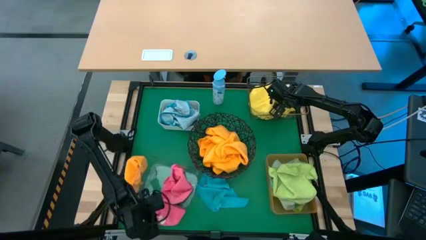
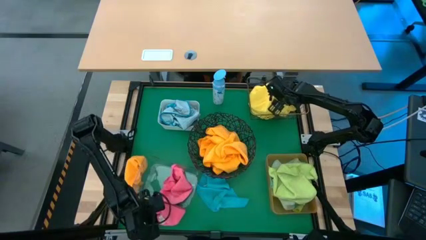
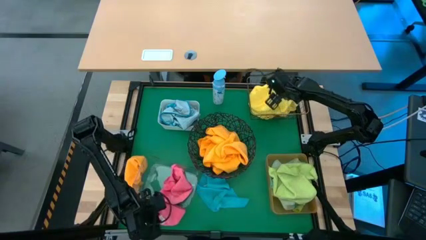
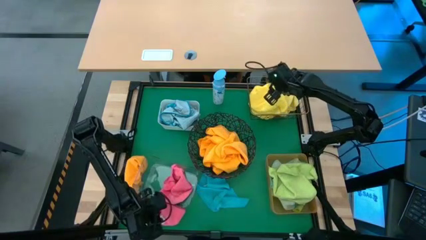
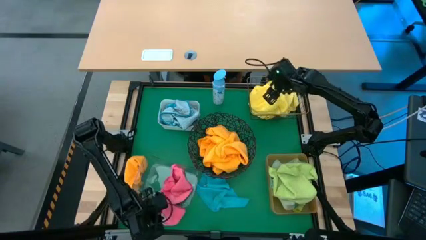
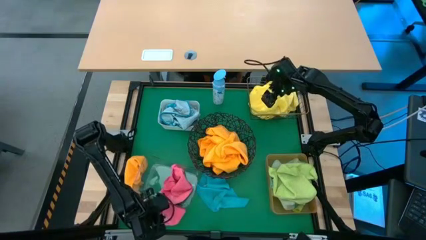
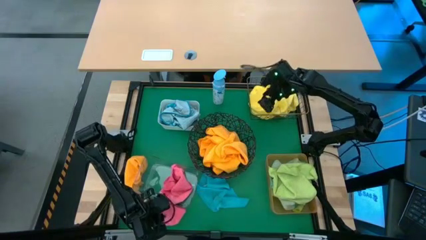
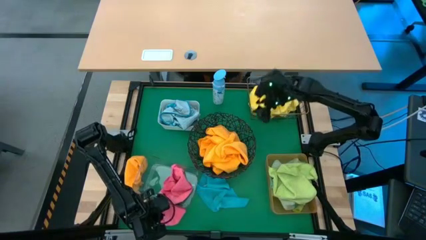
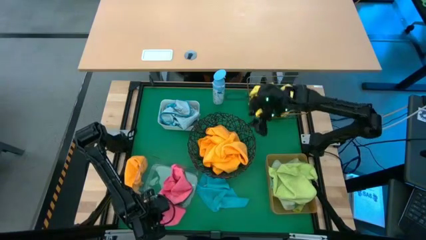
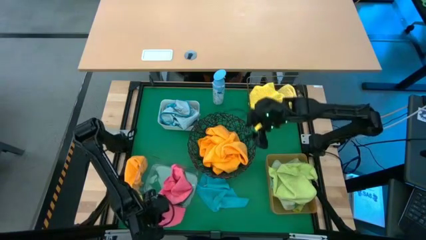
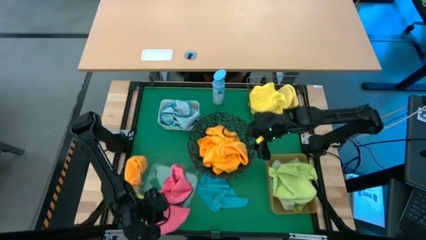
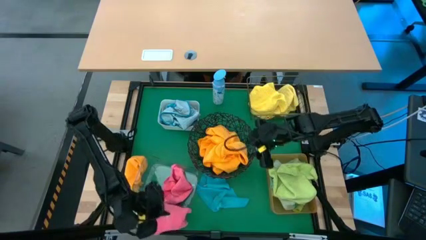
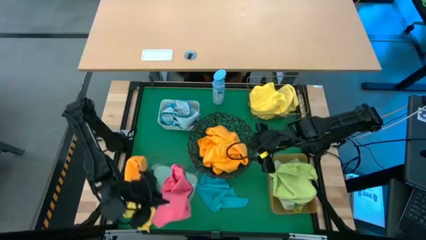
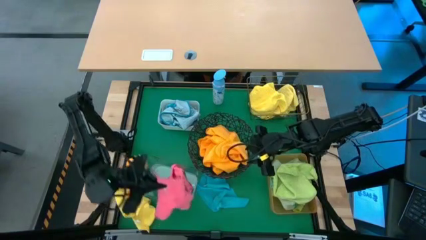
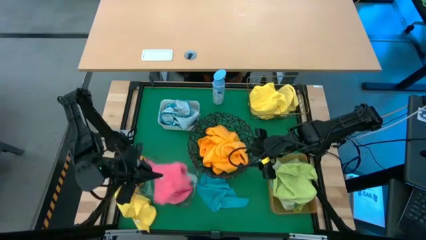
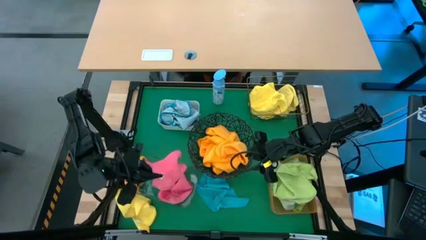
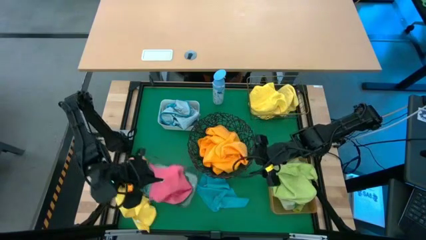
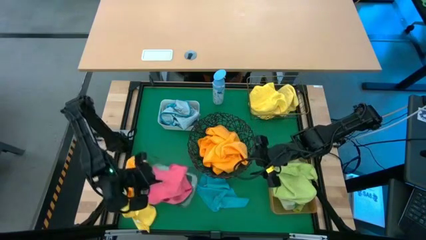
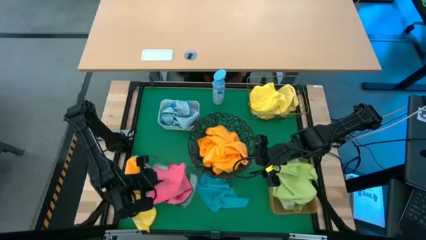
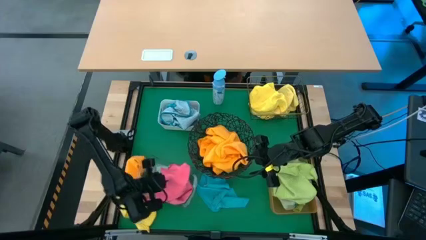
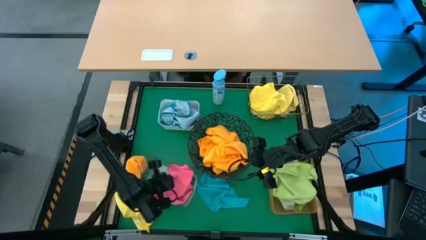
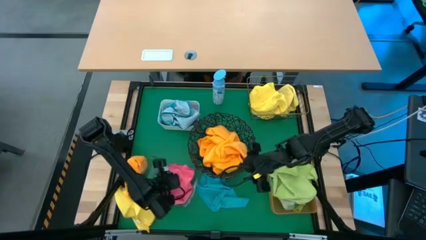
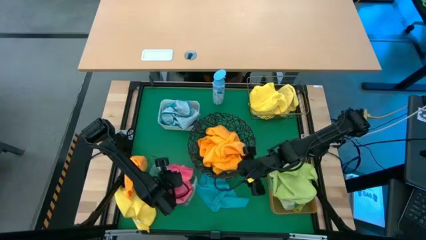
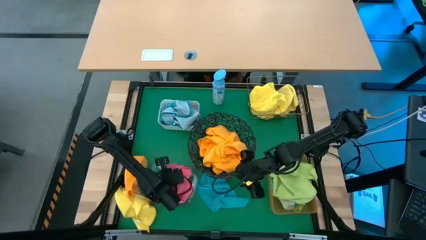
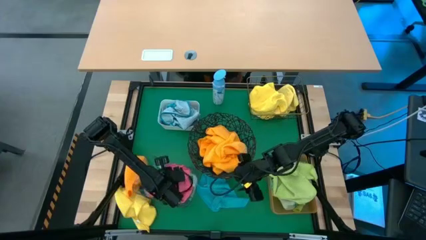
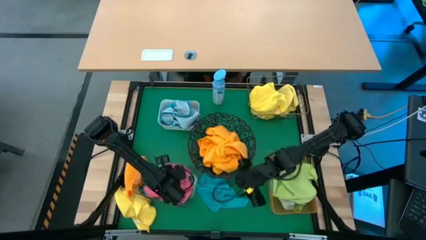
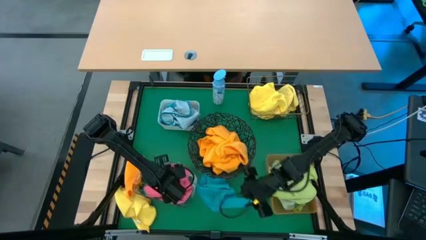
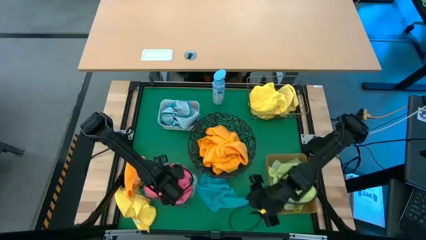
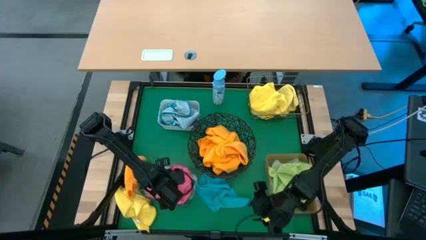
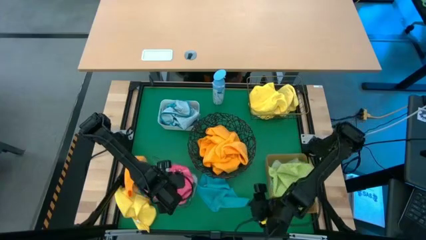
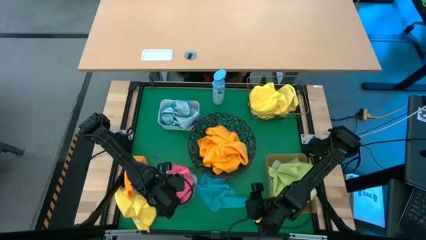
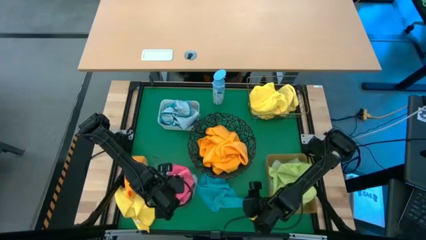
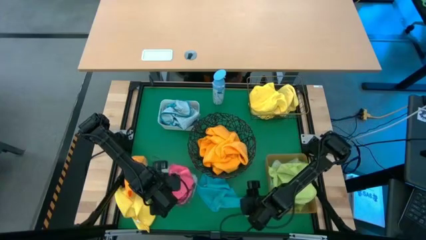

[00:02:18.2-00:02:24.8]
Task: Sort microfiber towel by color & place in baskets
Put the pink microfiber towel into the transparent bin

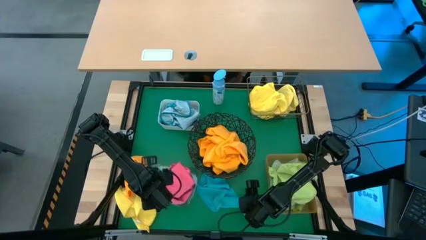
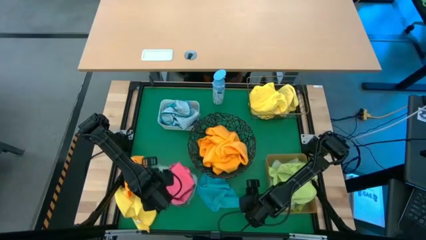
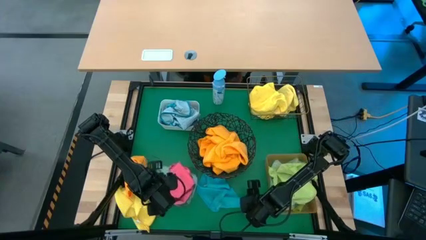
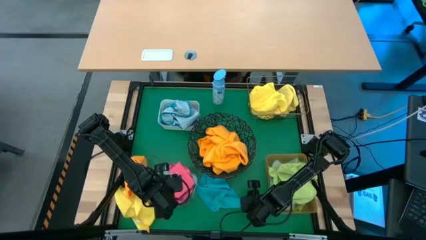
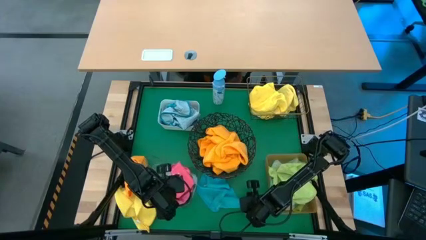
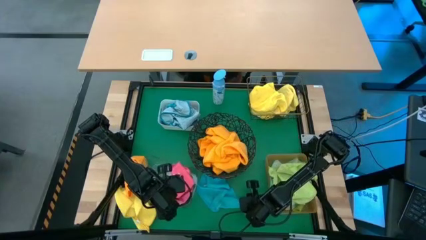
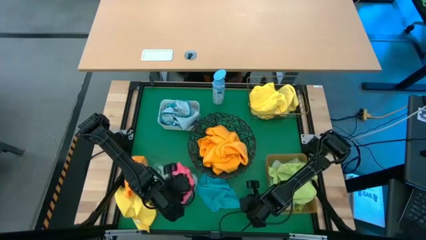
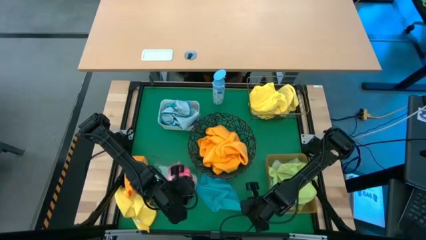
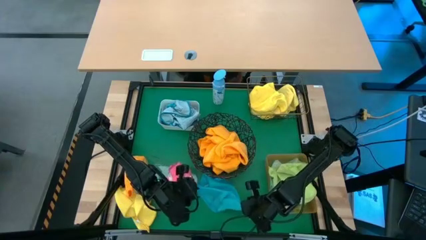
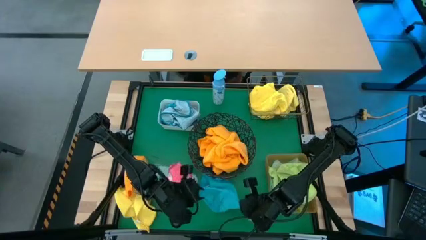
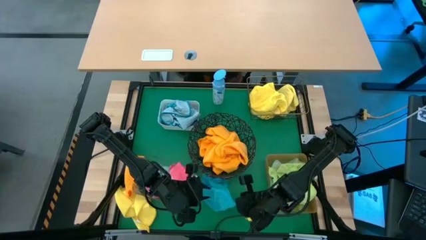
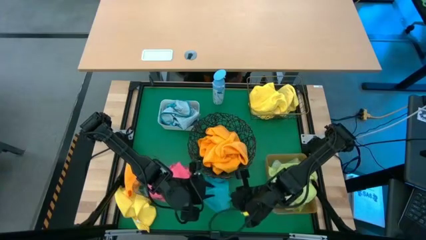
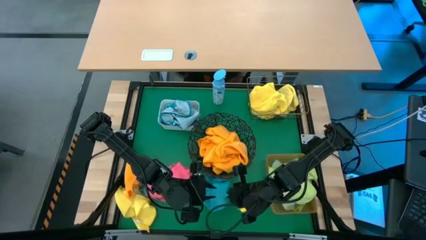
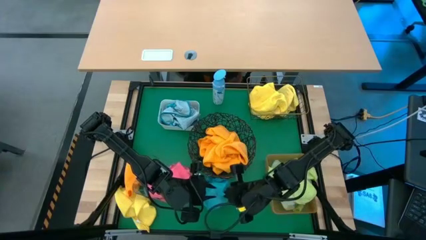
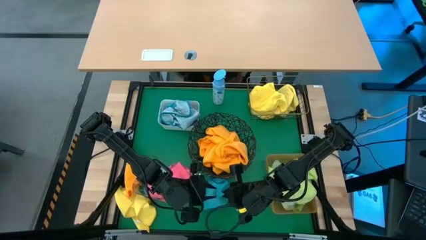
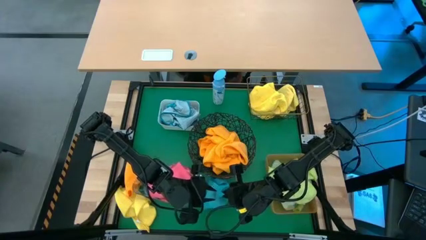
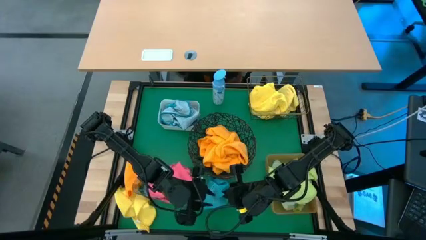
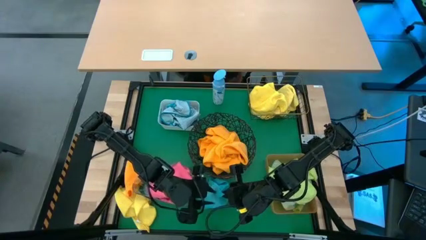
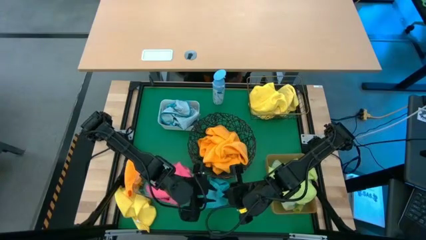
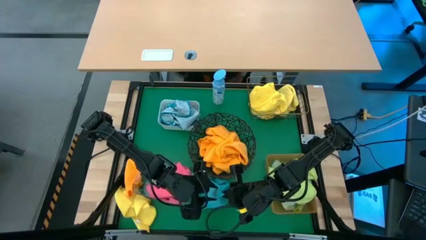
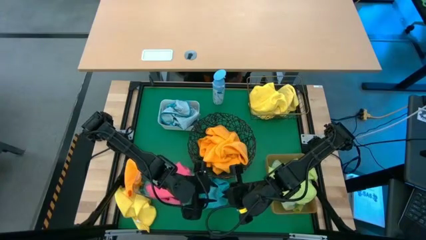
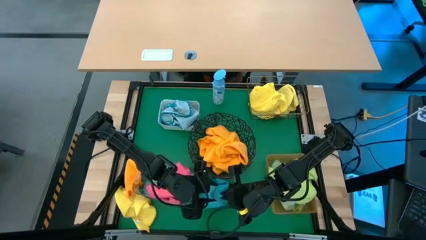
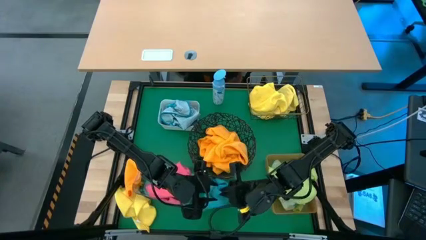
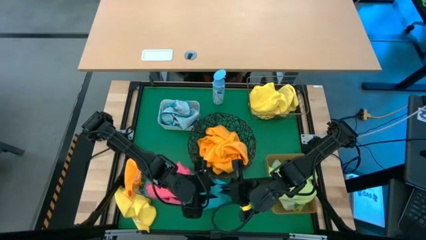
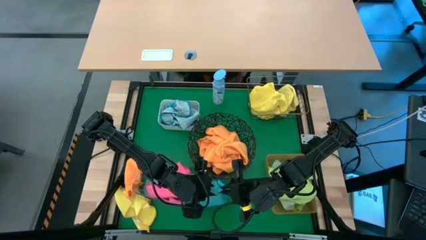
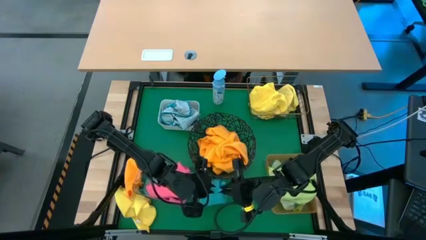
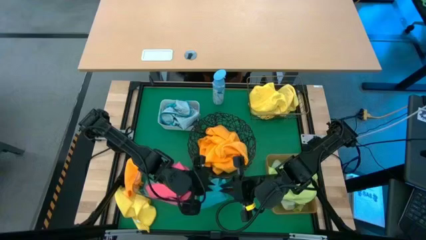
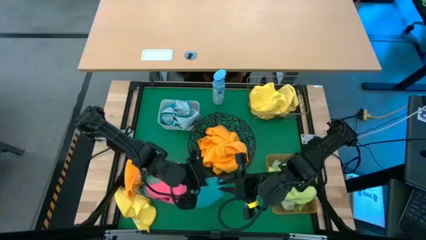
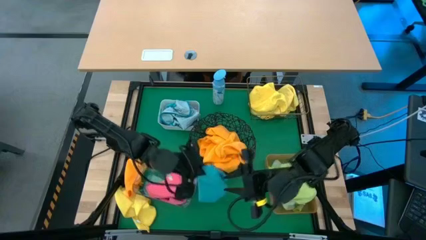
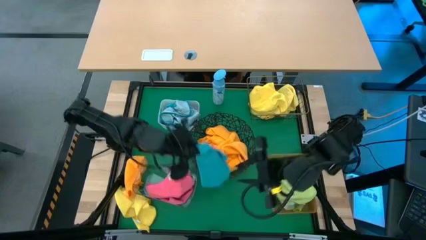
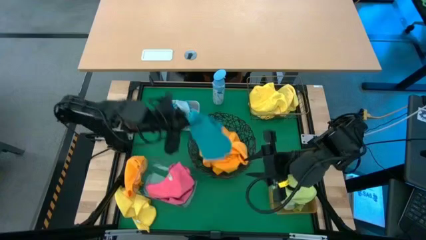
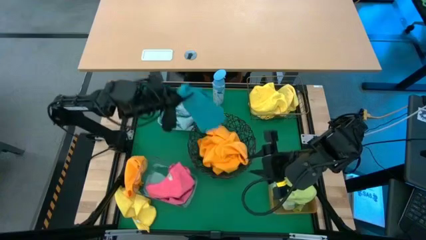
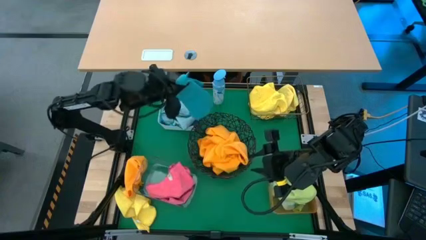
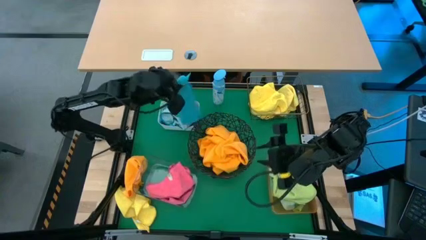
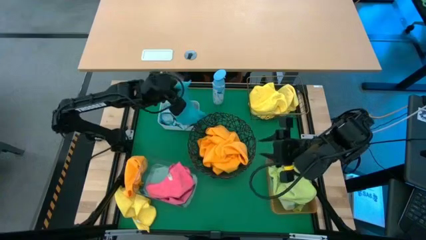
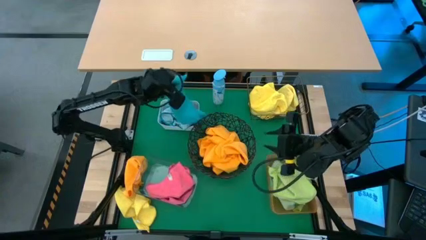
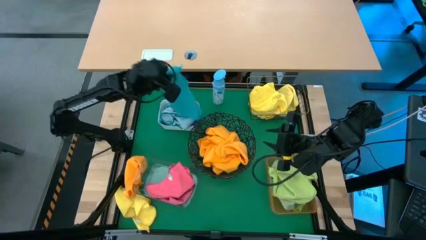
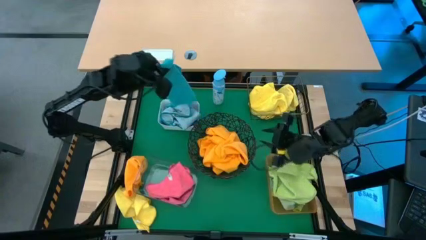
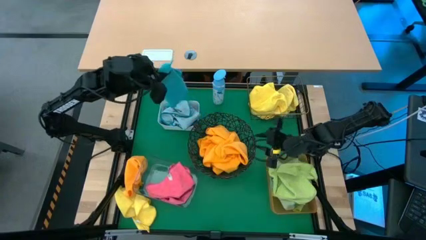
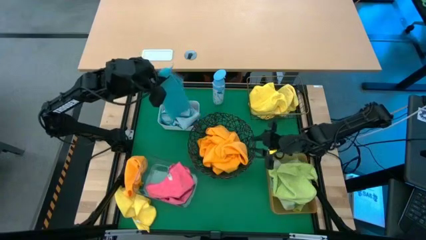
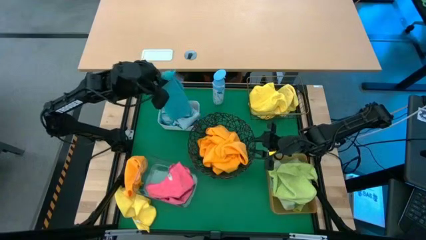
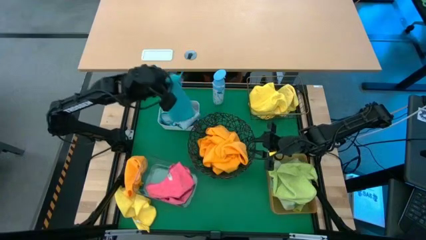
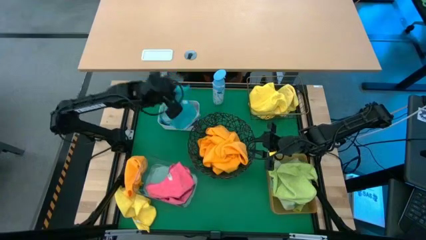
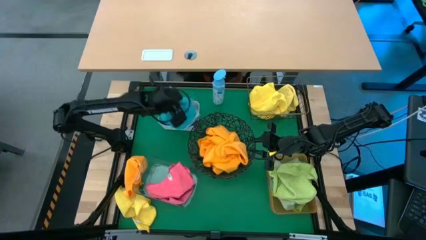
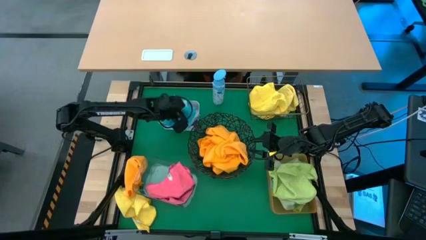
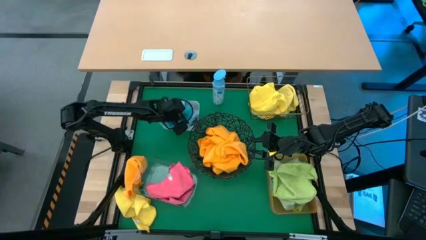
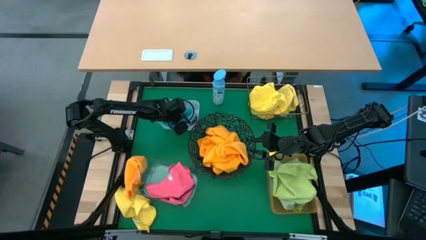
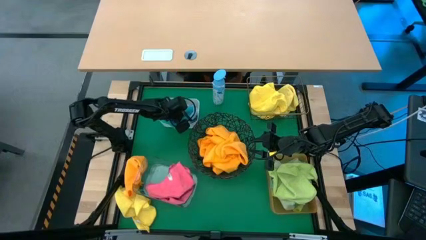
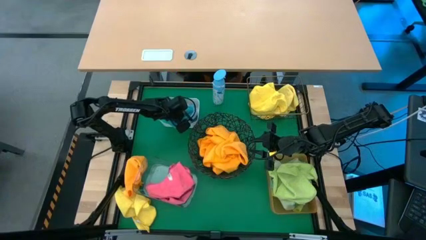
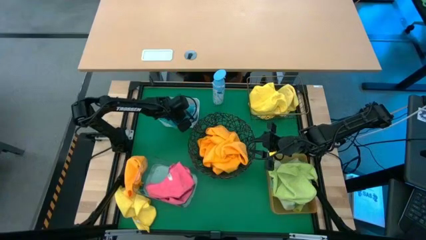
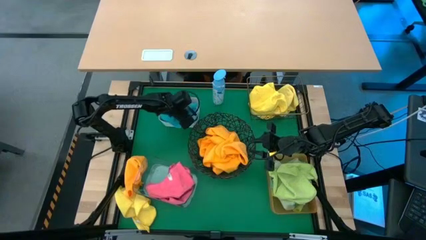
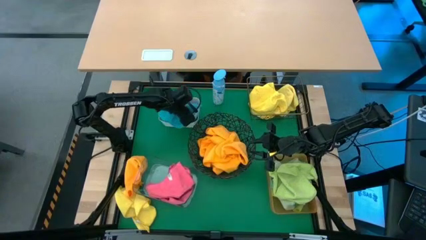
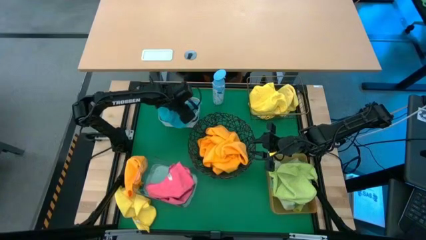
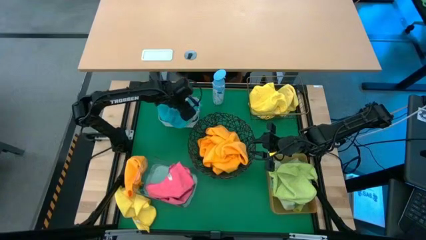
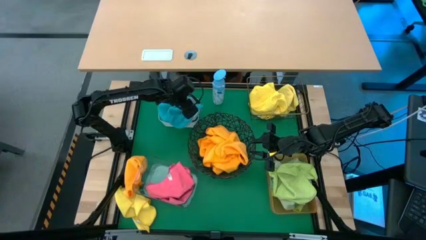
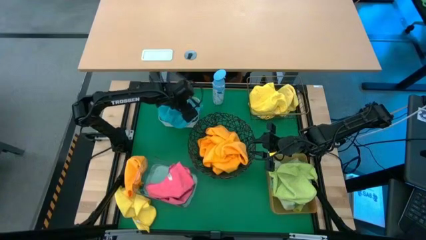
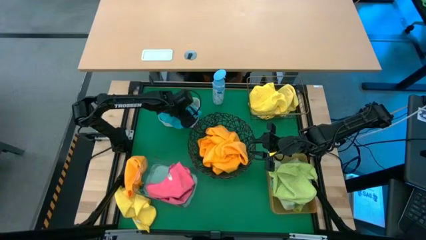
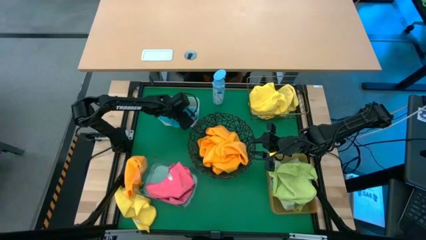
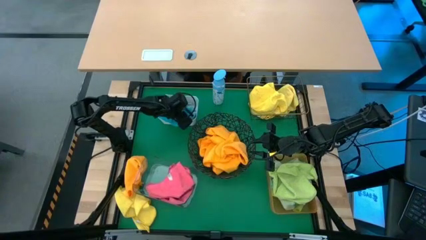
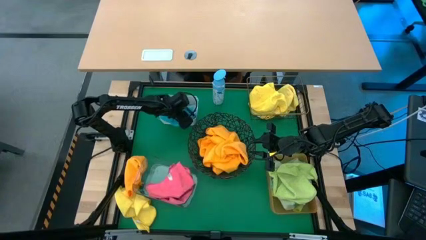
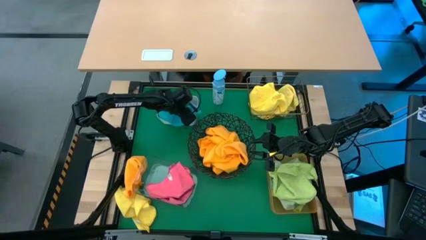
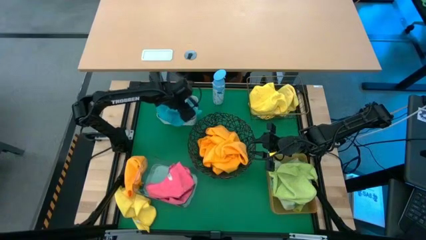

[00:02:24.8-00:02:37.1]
Put the blue microfiber towel into the white bin
